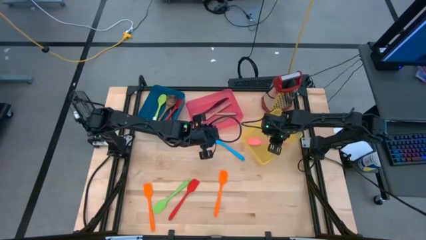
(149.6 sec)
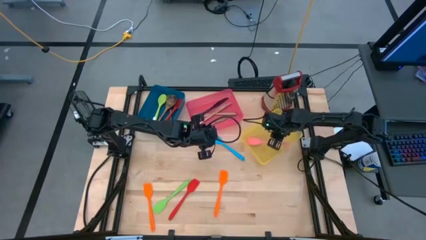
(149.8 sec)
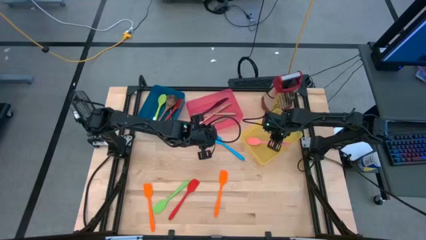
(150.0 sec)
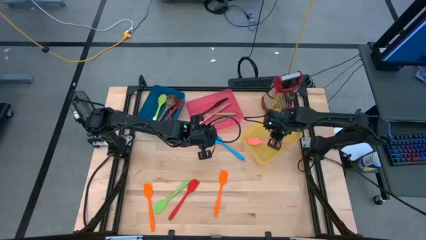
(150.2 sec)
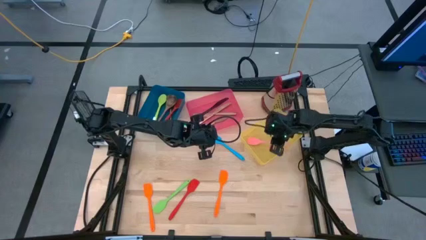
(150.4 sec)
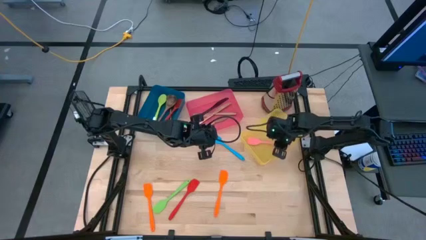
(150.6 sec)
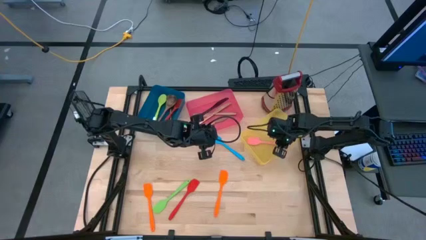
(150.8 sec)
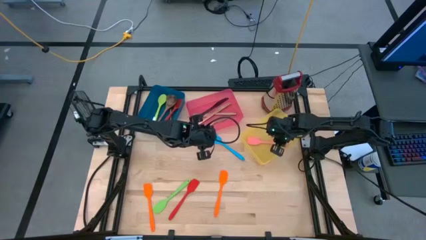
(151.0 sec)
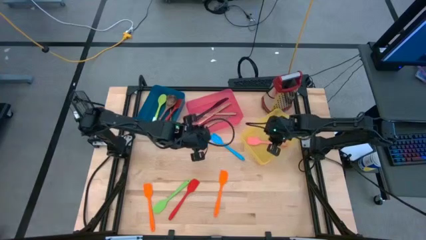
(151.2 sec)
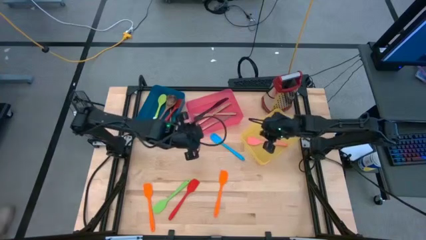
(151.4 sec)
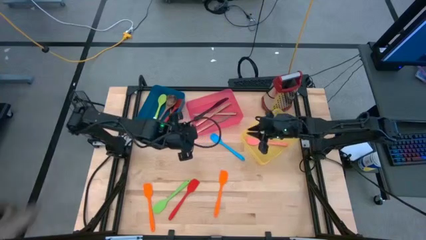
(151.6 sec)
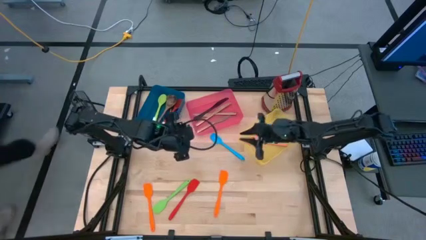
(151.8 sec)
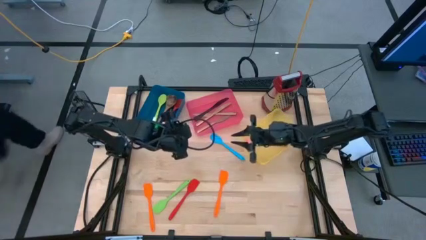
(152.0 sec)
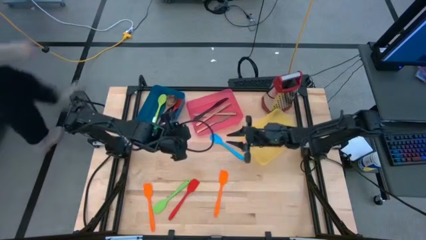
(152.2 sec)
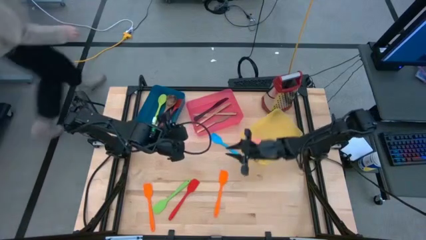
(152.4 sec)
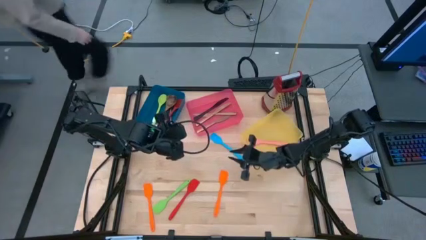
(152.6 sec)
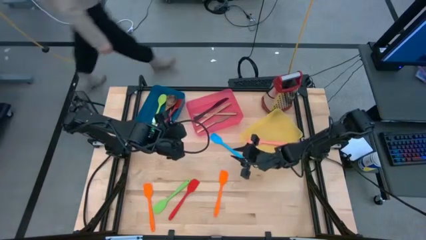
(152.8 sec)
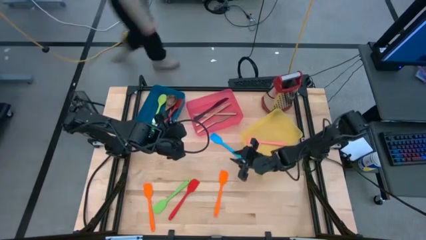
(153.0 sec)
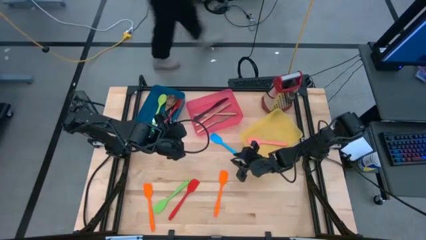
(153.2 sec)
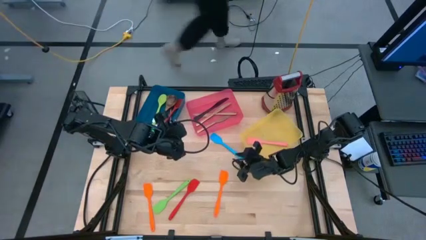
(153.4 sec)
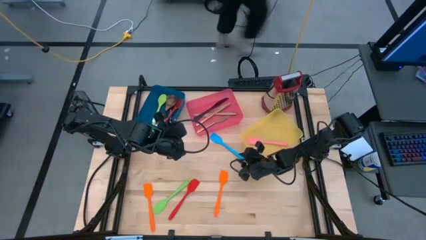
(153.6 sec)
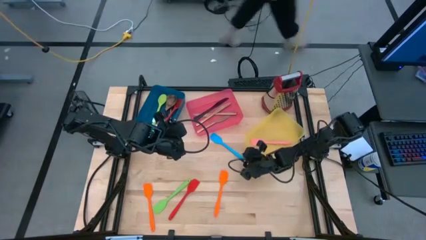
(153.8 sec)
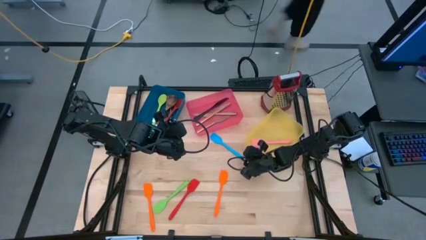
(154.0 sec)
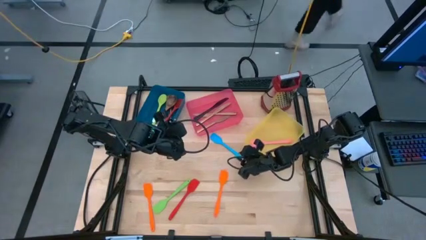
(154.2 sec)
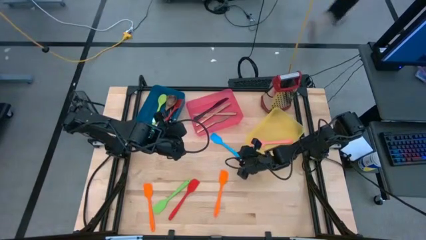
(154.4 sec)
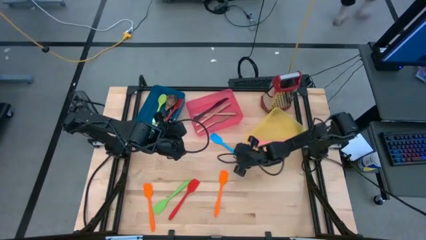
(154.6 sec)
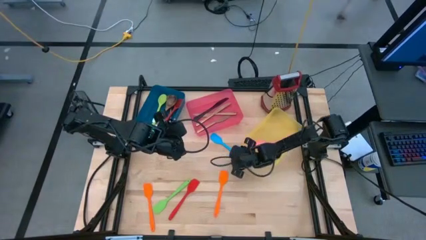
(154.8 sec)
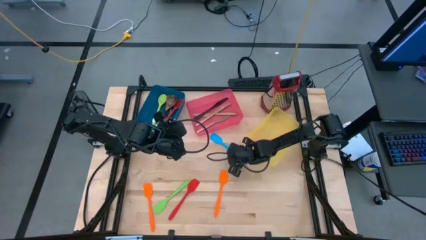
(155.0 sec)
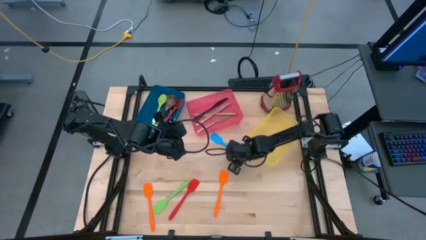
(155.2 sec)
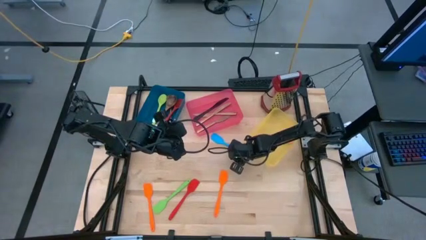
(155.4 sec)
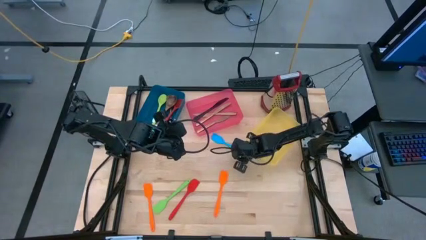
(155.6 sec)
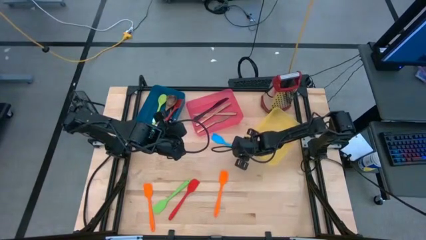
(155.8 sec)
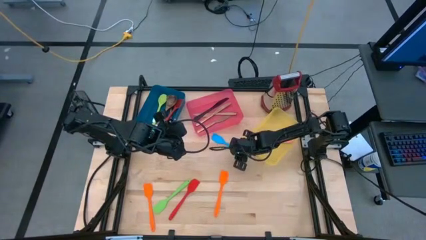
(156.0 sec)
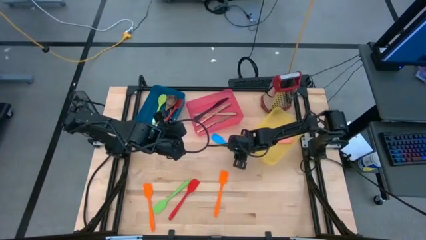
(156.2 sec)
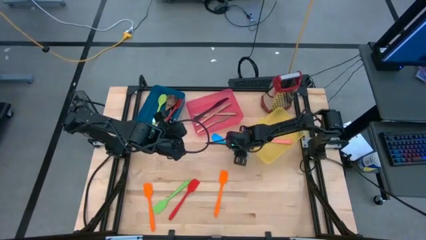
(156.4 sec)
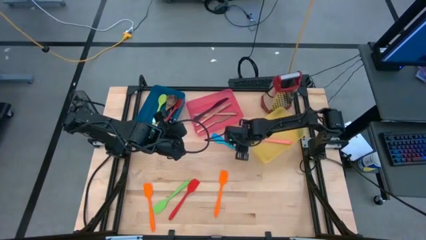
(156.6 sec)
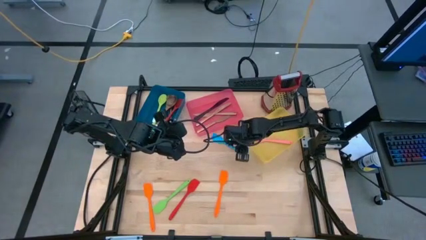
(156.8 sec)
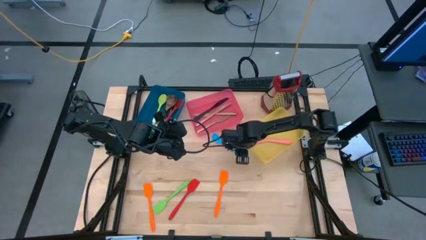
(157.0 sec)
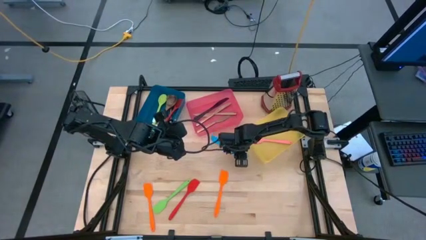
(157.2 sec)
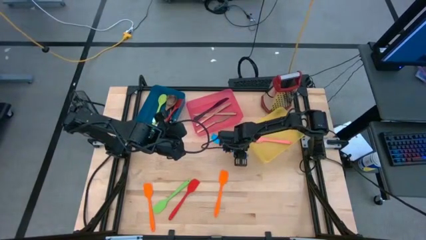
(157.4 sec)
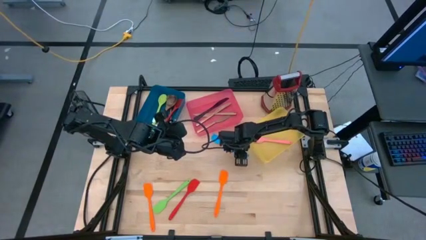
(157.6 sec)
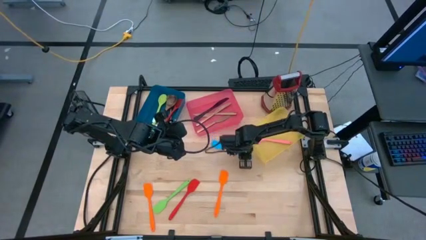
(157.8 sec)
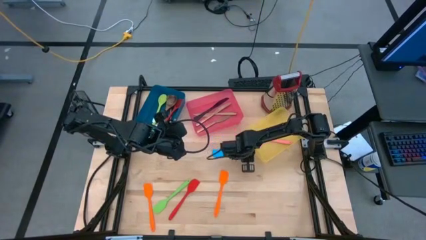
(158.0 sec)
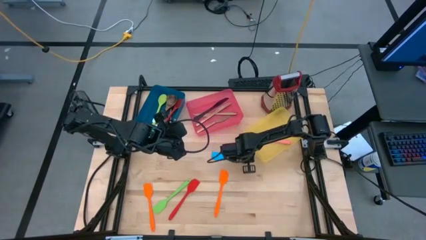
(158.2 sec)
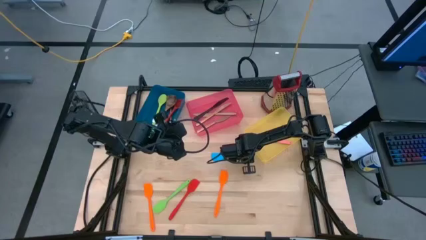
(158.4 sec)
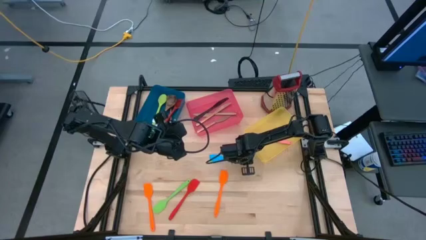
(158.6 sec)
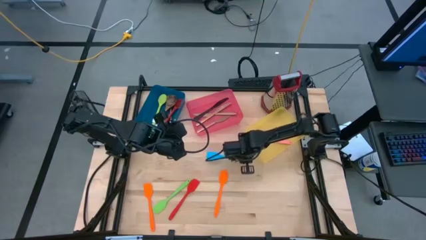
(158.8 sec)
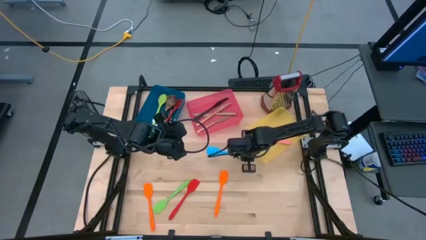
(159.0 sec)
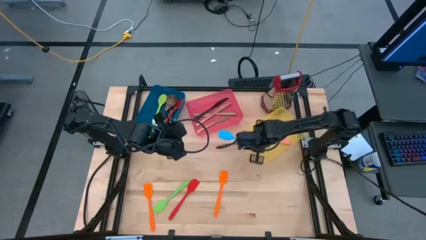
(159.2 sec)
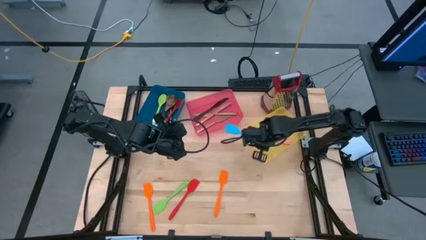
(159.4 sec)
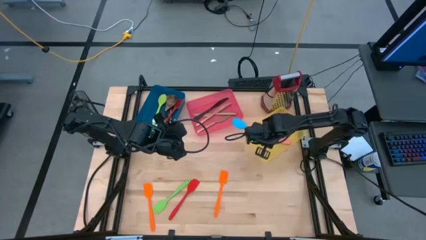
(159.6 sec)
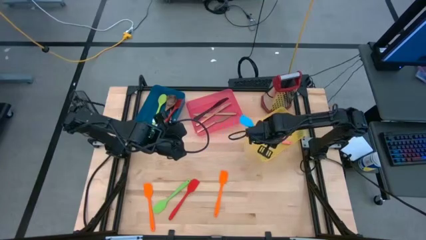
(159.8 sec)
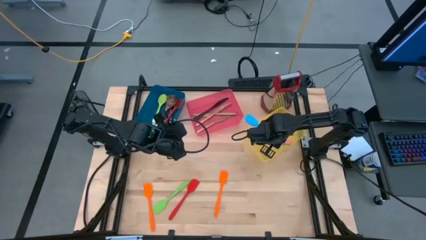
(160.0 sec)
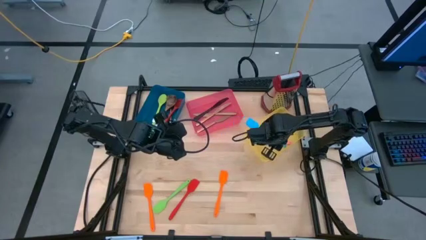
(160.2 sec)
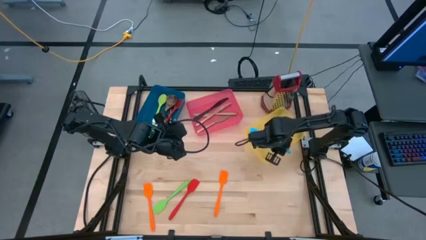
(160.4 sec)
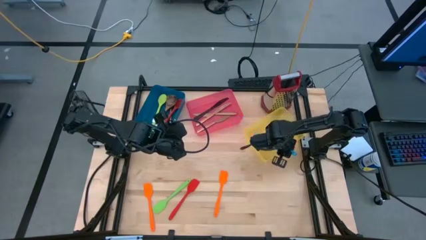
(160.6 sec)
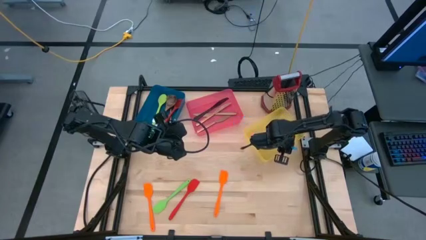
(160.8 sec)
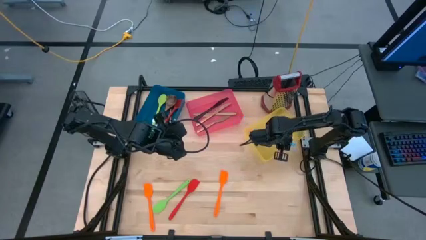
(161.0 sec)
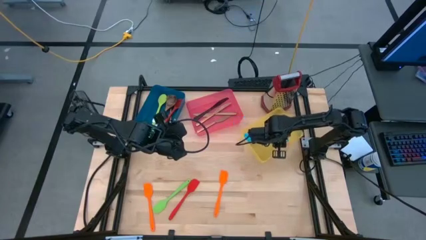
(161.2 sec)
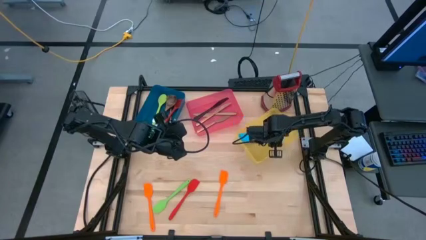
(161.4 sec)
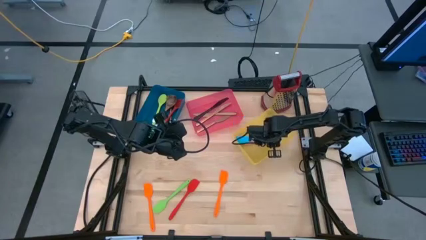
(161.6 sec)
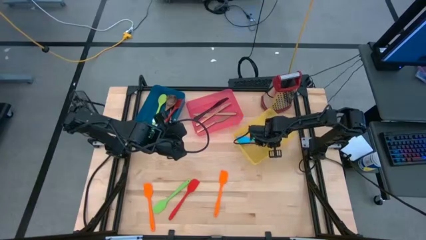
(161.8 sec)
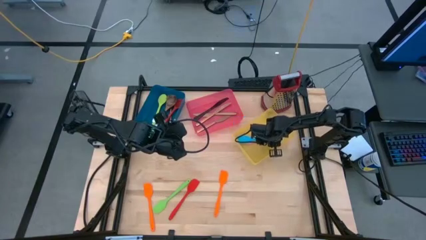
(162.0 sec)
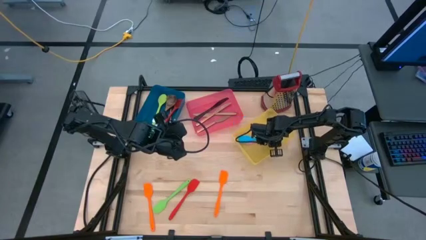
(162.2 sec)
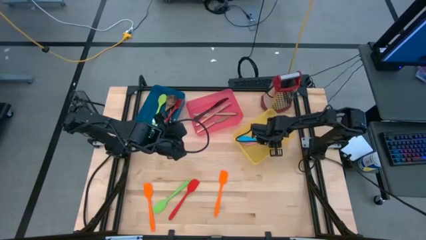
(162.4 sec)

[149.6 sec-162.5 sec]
Task: Pick & Place Kitchen Items
Put the blue spatula into the yellow bin

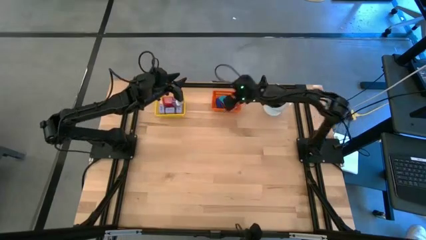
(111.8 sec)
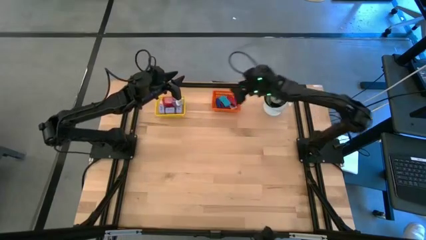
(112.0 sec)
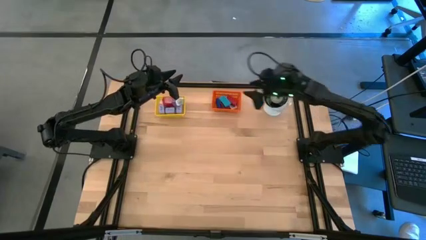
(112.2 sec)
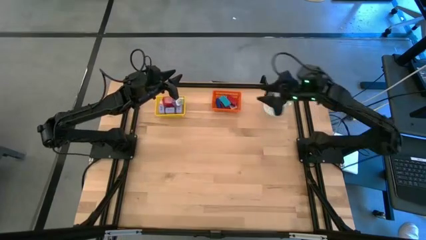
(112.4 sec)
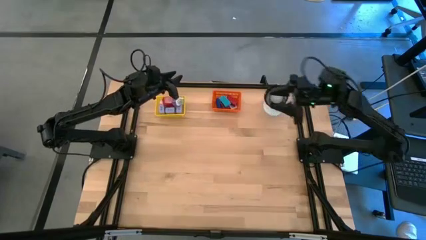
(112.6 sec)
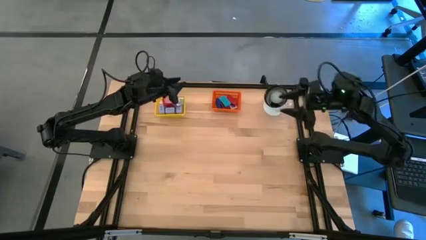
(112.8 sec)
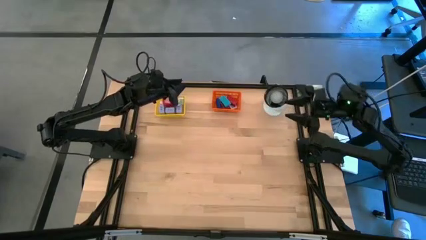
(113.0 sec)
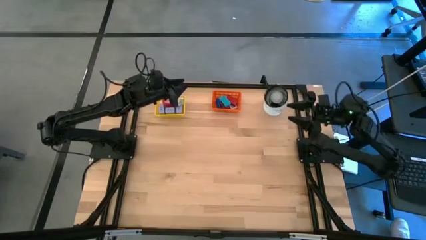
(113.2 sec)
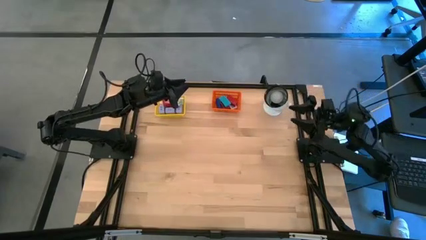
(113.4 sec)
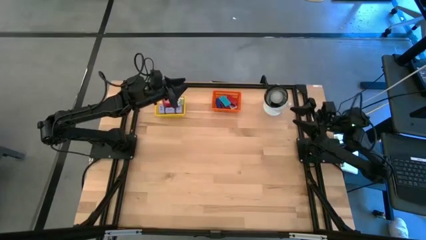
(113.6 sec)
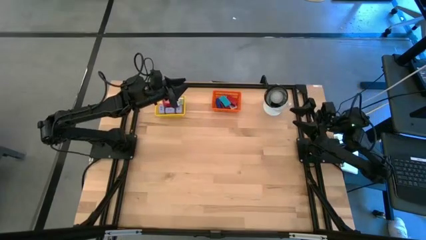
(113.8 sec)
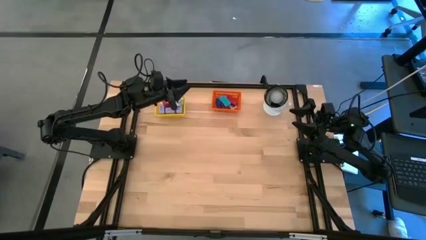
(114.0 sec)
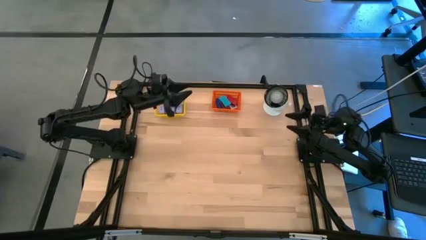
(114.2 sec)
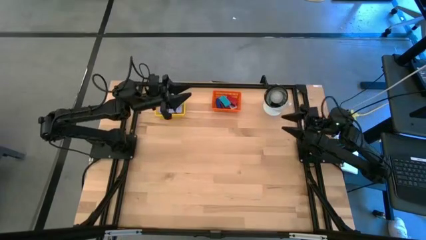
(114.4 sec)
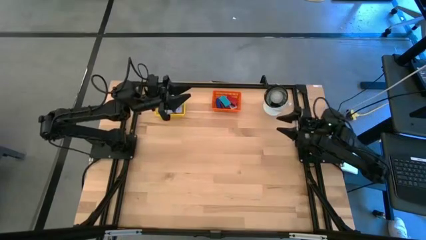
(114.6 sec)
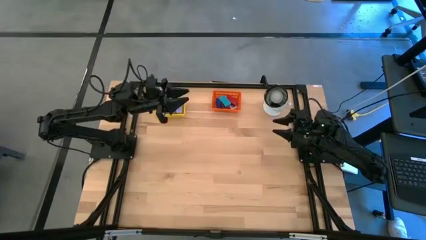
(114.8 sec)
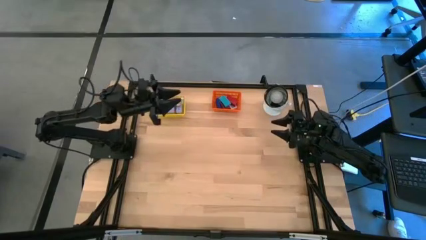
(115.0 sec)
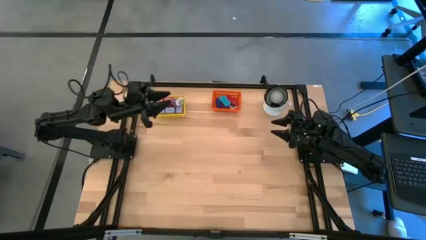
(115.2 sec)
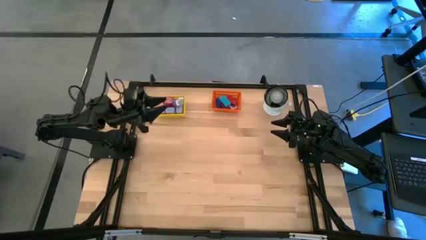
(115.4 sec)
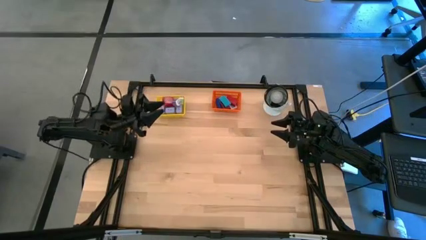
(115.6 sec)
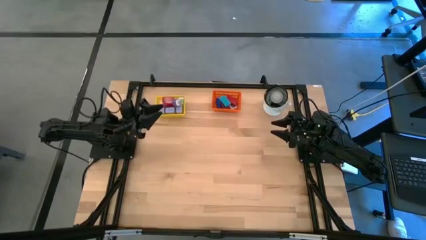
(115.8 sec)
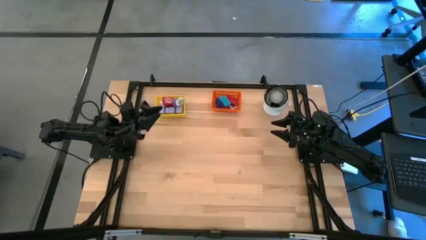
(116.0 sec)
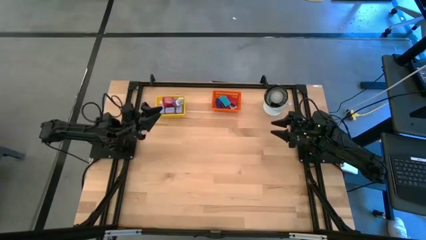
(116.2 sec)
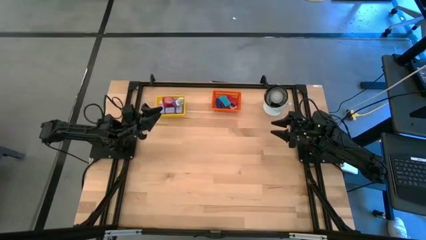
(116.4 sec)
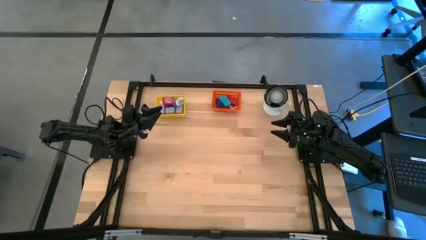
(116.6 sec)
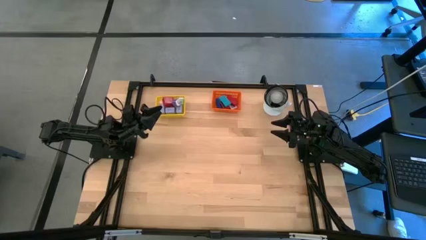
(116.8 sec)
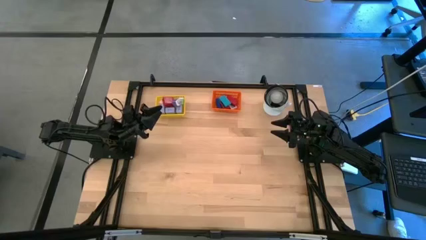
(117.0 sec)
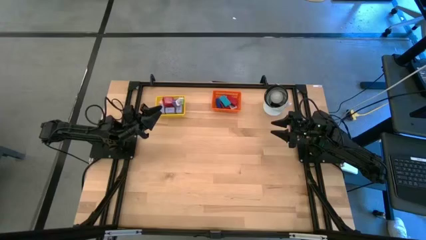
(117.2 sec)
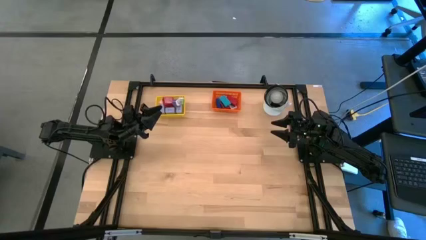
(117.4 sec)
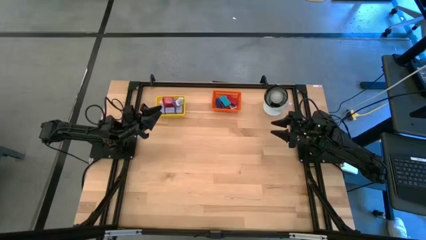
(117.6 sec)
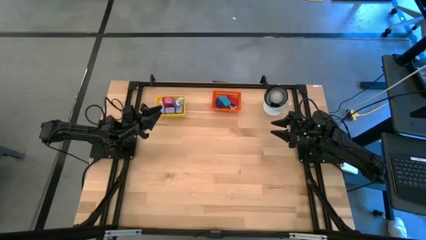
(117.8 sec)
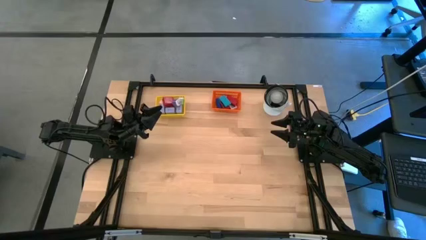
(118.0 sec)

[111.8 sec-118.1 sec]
Task: Pick & Place Office items
Return to Home Position
